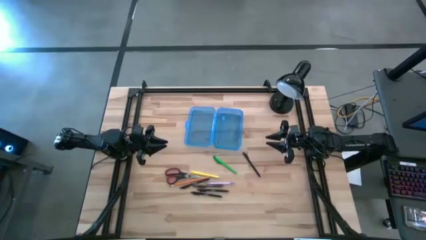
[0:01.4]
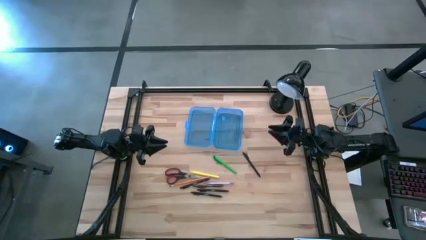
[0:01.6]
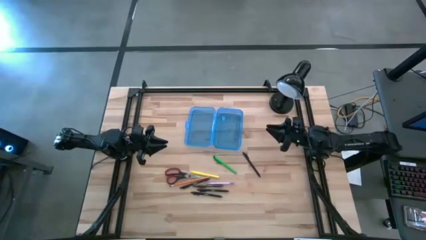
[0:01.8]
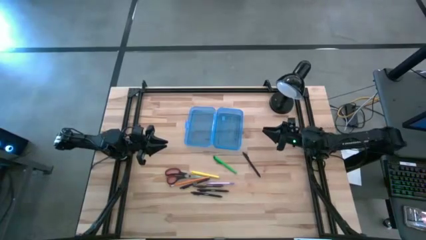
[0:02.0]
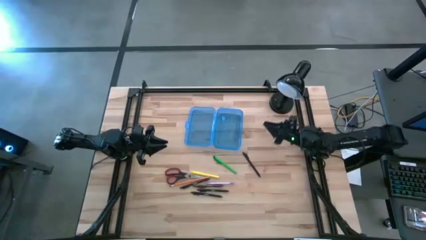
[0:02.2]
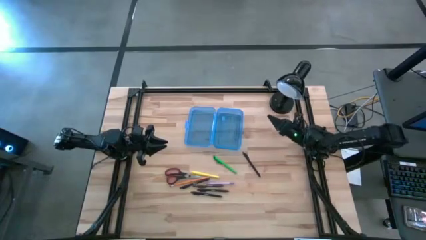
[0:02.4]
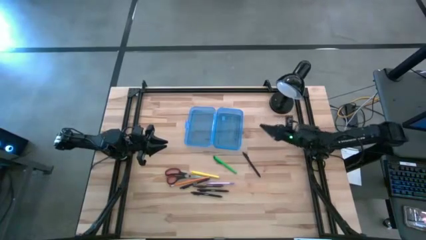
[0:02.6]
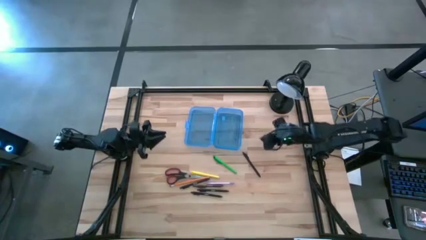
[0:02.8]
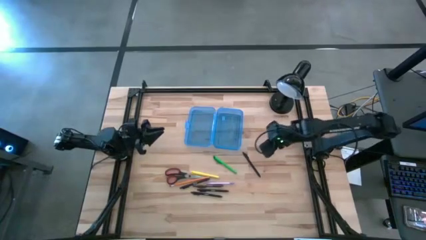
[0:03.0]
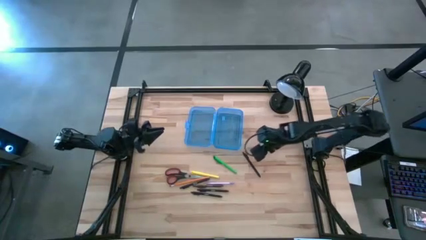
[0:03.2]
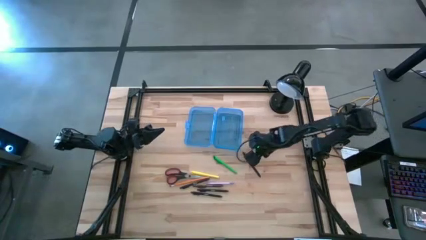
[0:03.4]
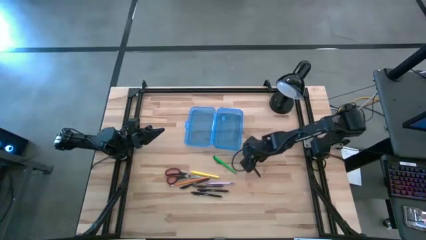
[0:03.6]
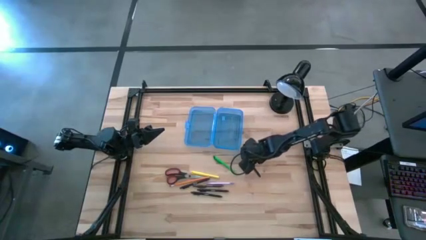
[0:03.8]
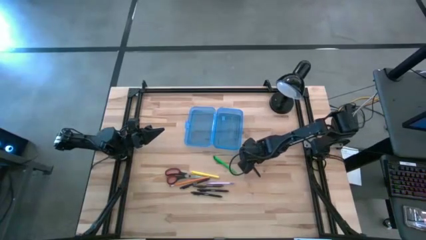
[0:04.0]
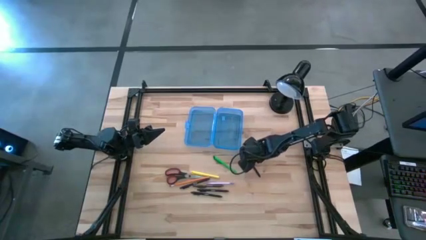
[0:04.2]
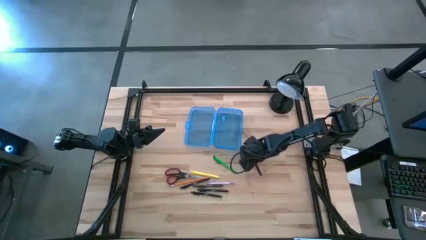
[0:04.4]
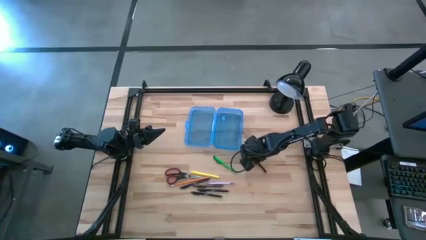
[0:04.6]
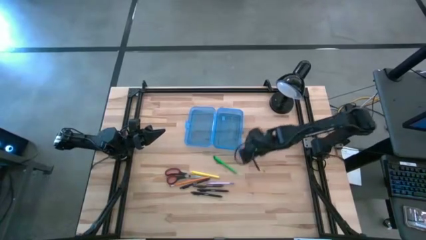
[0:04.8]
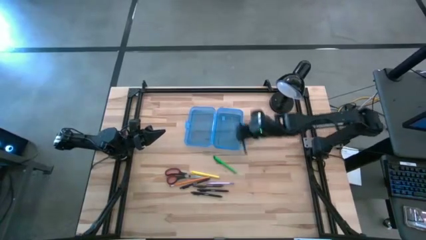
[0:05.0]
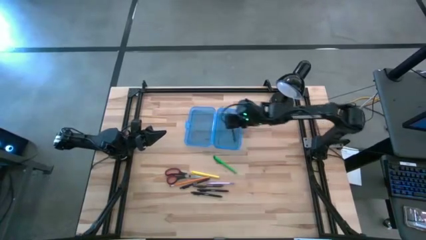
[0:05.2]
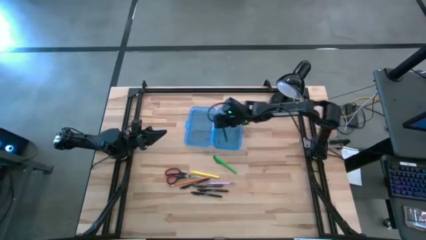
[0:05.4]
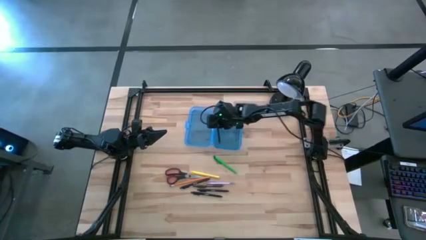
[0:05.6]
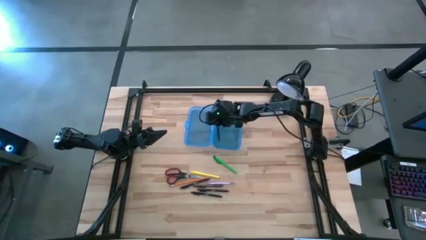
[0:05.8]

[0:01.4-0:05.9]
Task: Pick & place school supplies into a supply box
Put the black pen into the blue box

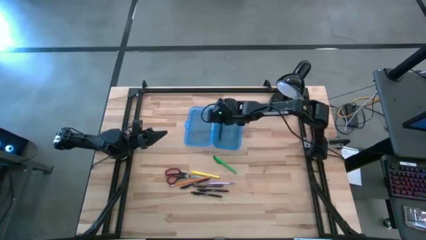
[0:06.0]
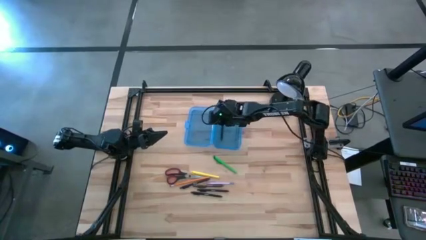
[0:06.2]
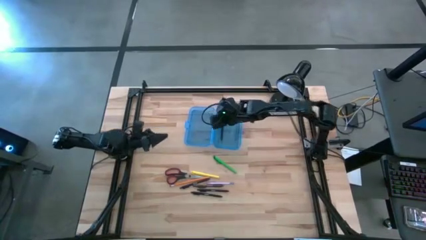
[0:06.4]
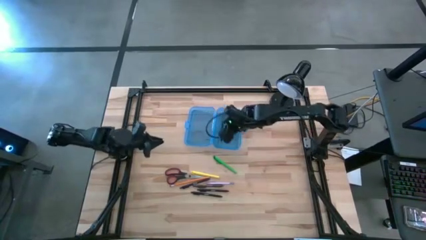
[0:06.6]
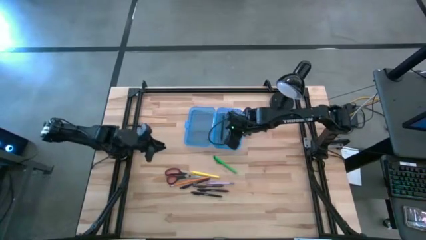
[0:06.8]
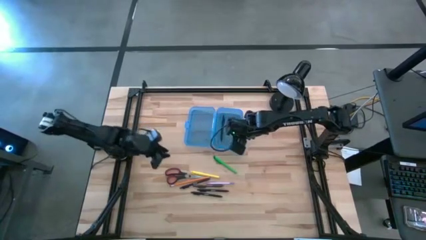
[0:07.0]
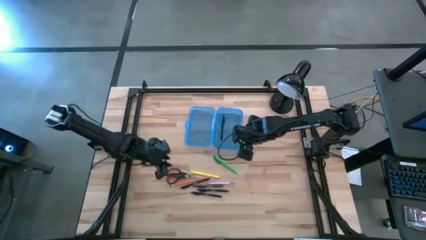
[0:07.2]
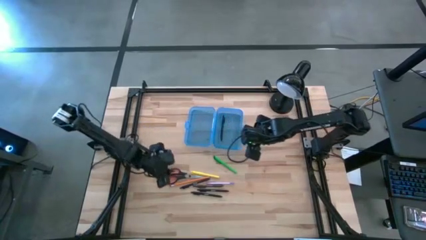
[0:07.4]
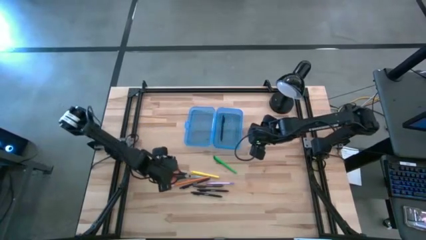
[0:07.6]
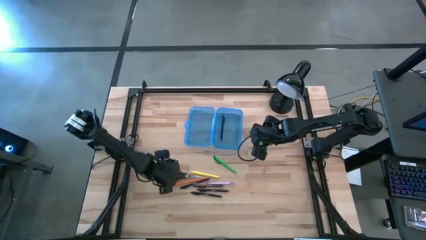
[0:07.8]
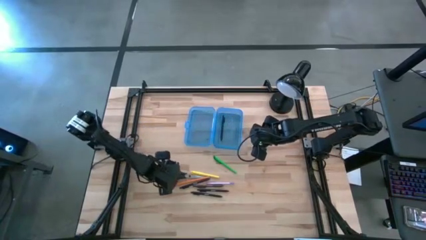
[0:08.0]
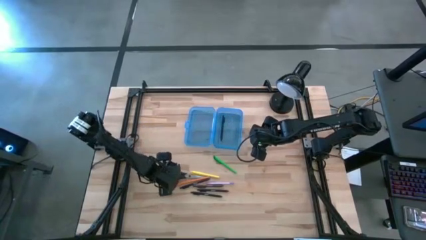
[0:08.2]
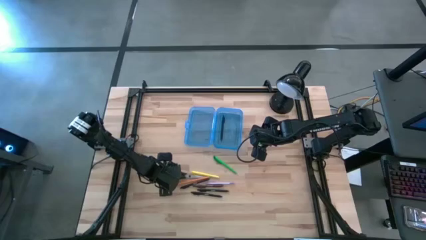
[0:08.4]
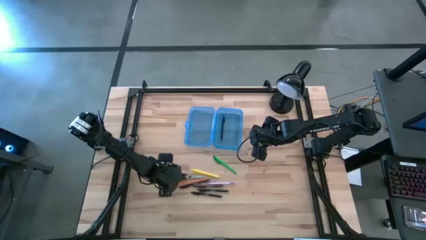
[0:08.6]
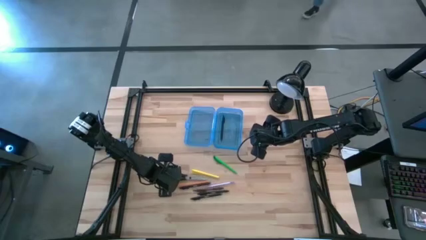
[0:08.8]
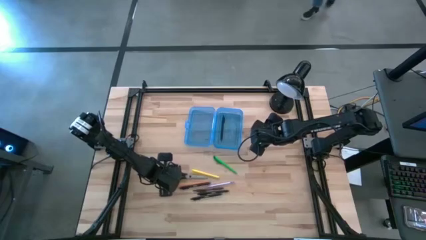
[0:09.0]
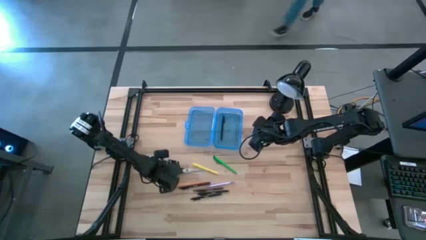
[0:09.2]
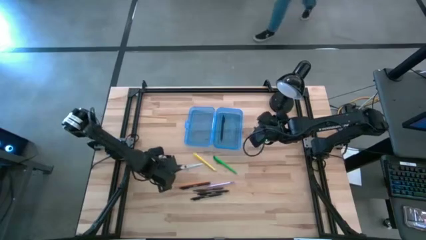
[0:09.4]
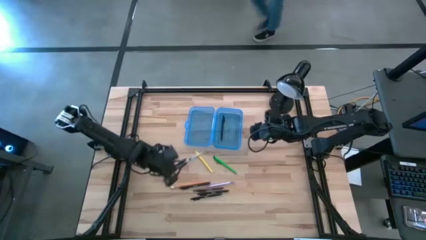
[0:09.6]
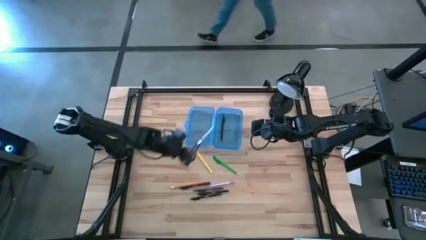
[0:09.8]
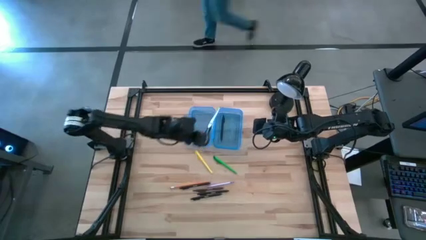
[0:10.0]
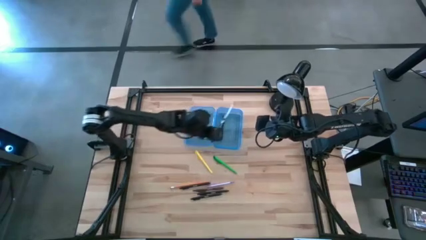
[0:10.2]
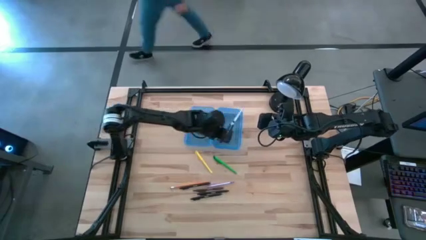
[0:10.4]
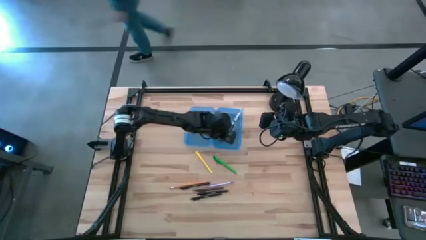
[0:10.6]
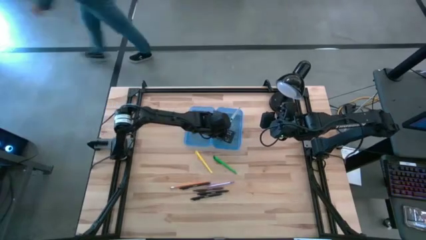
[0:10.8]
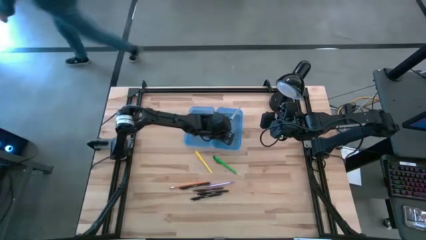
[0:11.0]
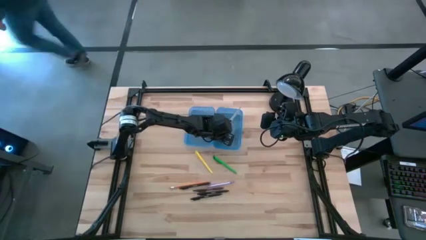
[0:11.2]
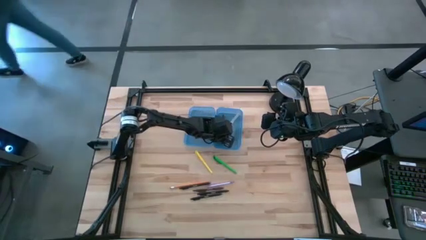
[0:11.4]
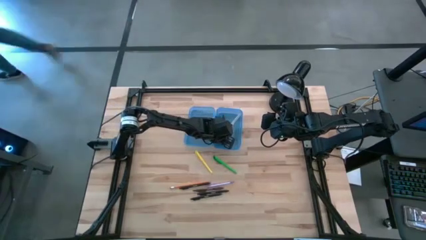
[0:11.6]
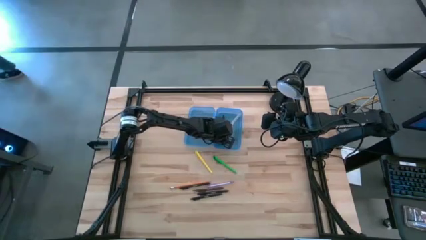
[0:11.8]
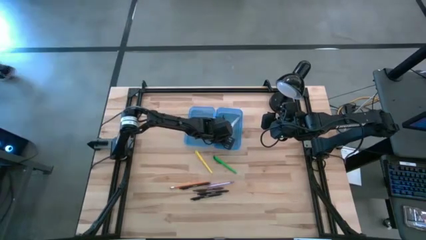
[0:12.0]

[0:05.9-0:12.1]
Put the black scissors into the blue box

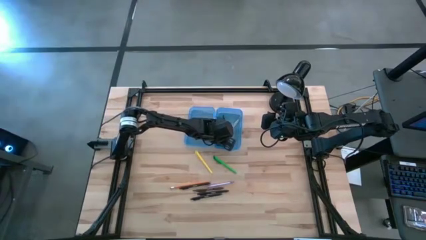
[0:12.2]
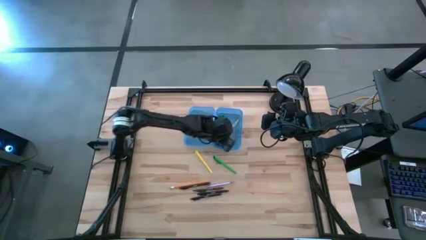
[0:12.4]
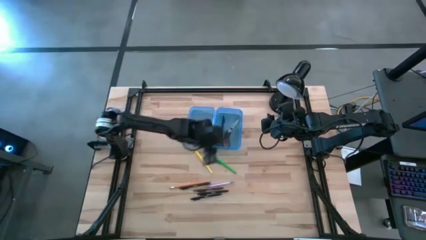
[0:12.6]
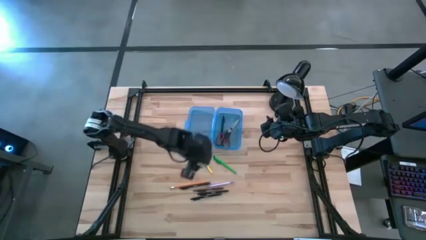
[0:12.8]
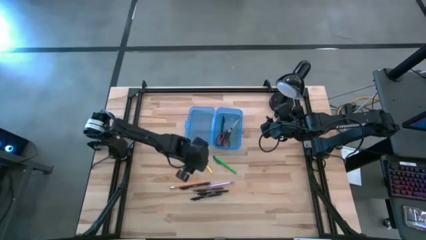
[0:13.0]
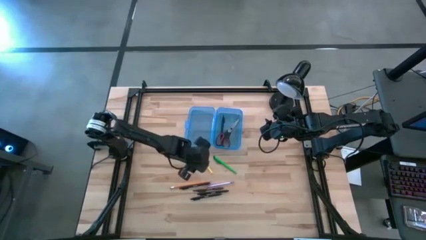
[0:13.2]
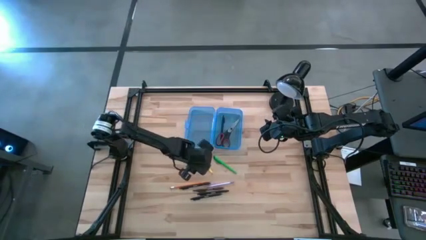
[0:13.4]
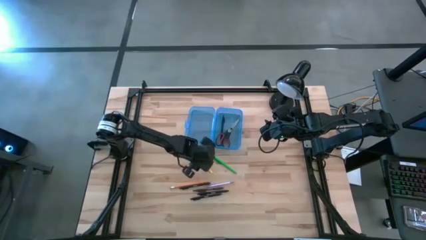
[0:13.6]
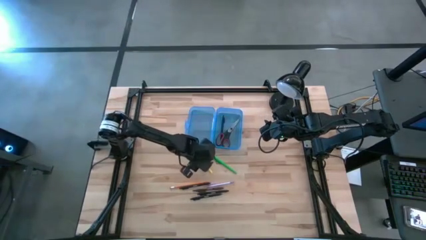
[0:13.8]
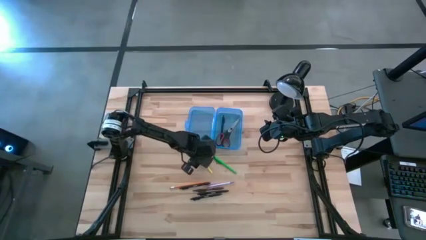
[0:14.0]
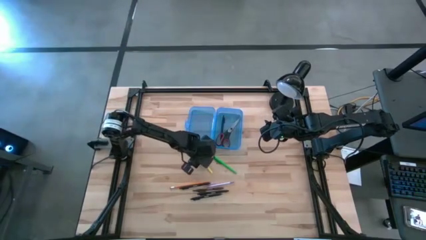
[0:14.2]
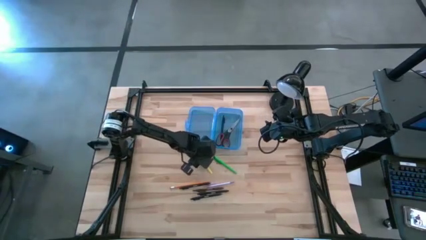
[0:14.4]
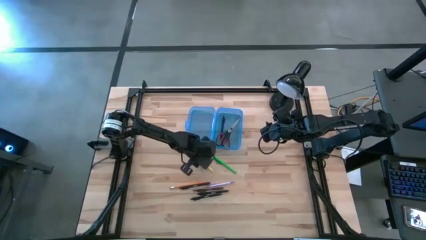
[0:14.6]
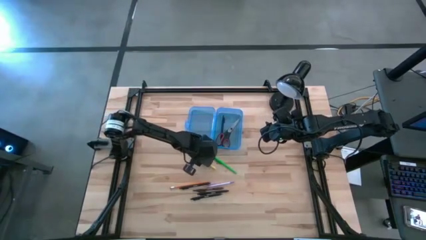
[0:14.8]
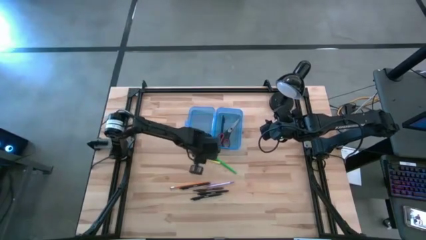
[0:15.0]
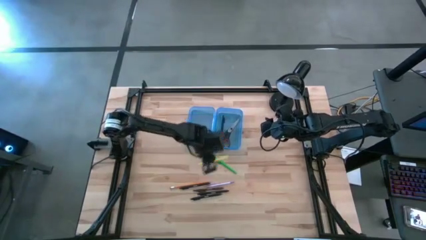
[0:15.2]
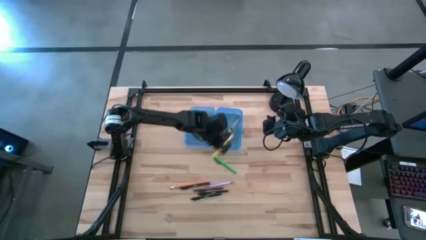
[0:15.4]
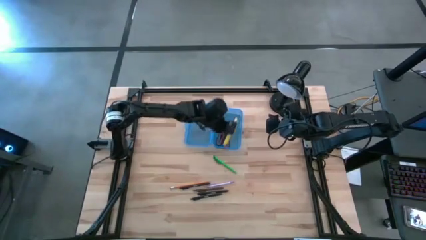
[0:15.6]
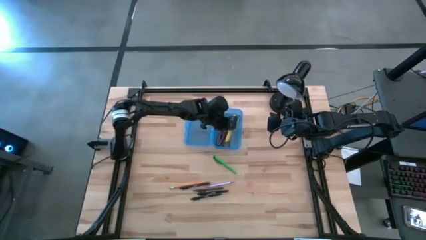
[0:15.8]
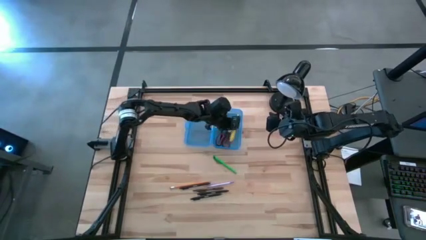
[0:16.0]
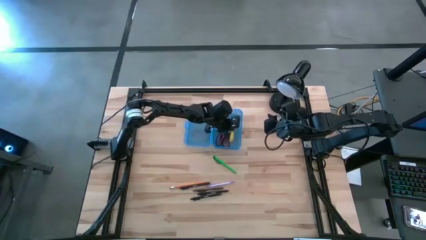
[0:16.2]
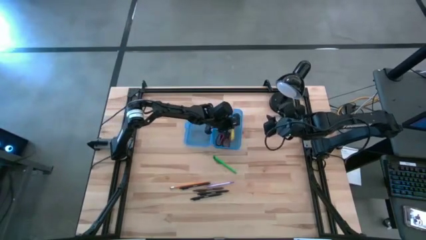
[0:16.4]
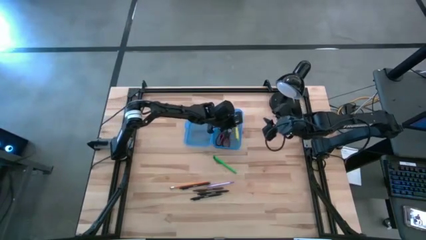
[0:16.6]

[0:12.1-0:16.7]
Put the yellow pen into the blue box

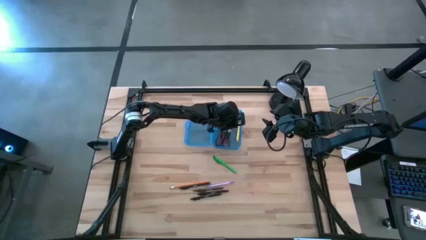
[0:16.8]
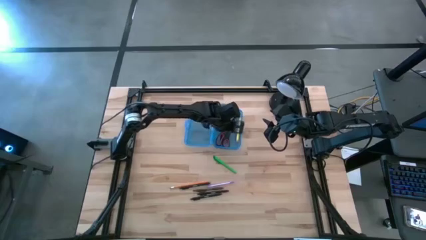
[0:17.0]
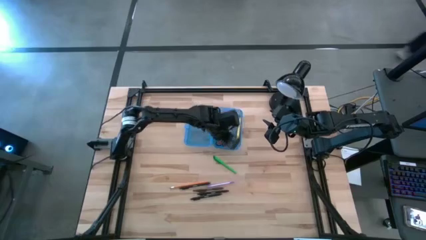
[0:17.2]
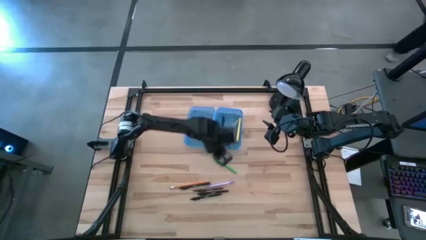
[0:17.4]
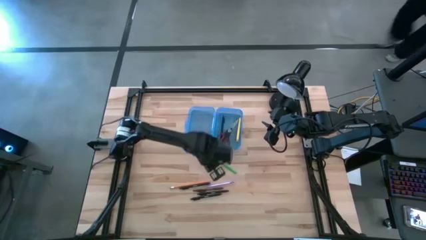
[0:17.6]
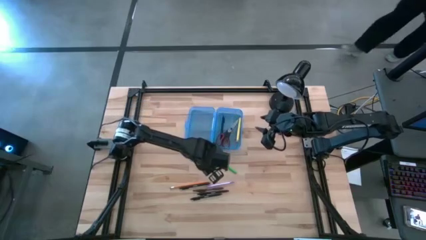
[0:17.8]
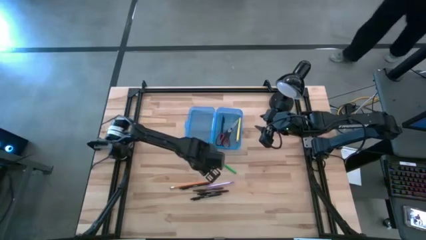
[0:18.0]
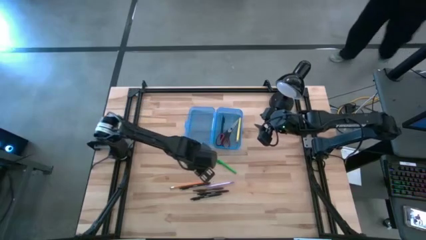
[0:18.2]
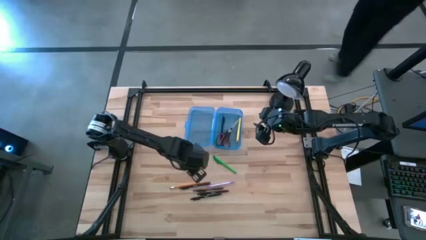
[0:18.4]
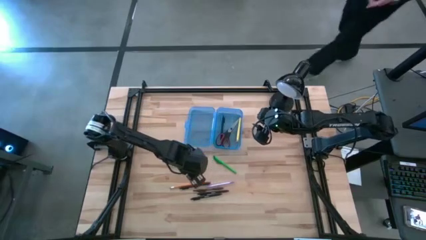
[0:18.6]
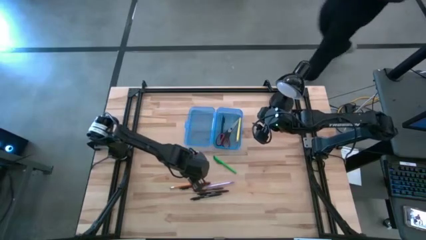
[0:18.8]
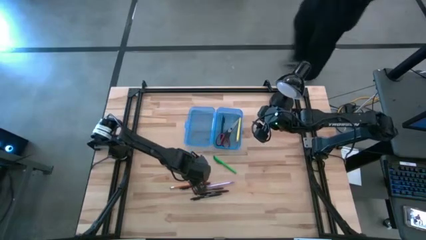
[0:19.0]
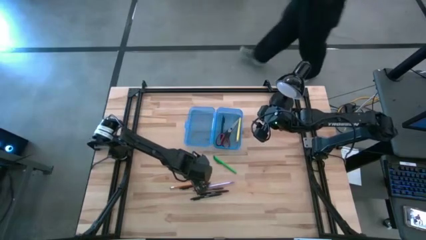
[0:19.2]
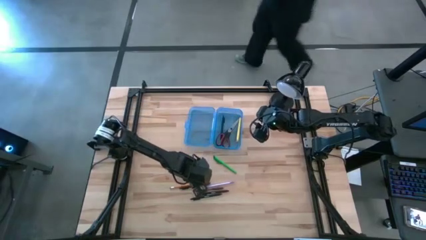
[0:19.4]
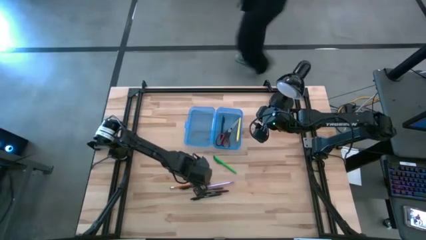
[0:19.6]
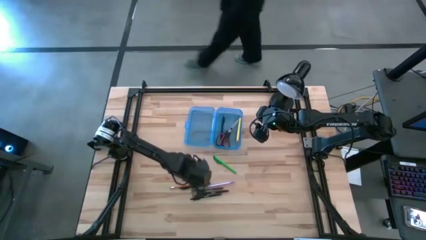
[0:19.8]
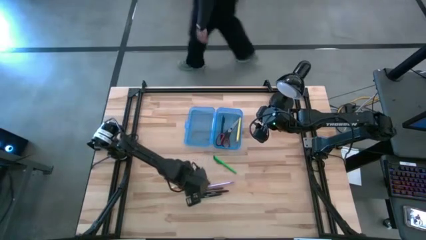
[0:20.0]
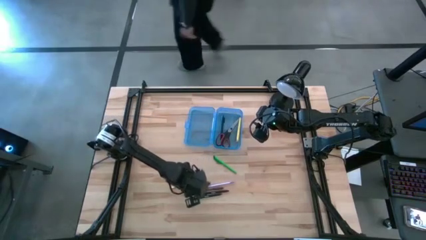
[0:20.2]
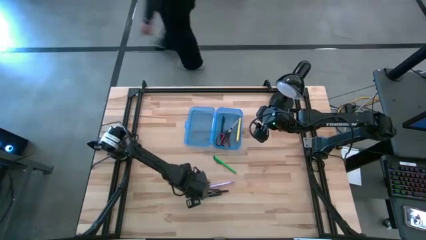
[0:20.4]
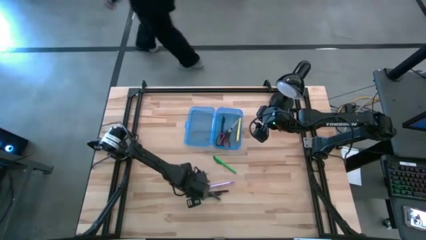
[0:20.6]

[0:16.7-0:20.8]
Put the brown pen into the blue box
